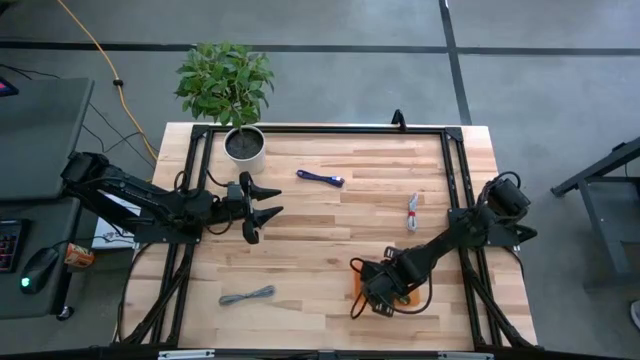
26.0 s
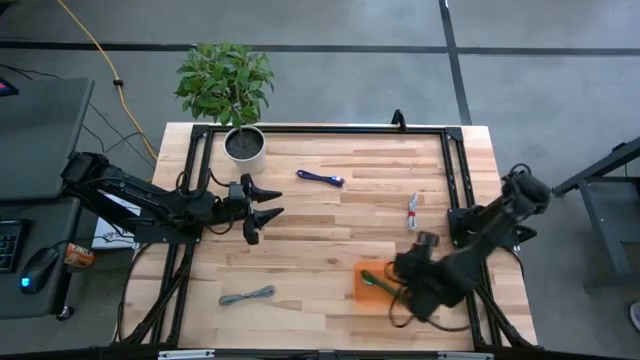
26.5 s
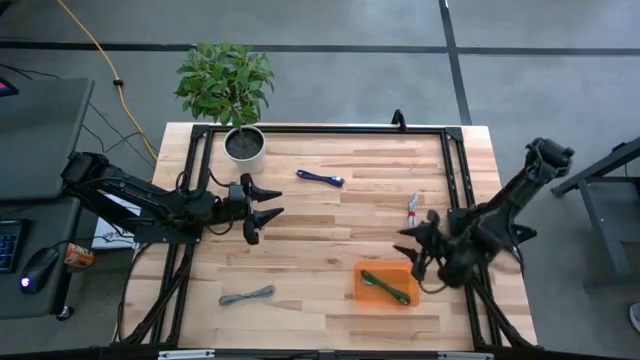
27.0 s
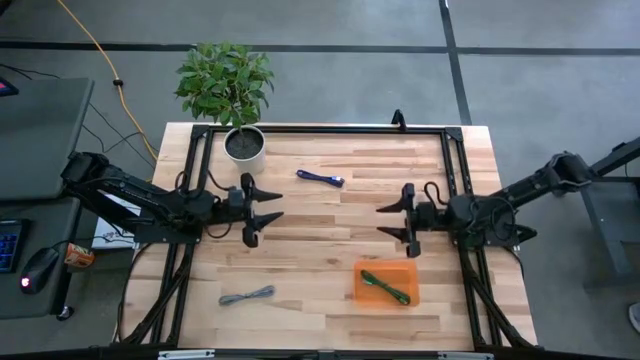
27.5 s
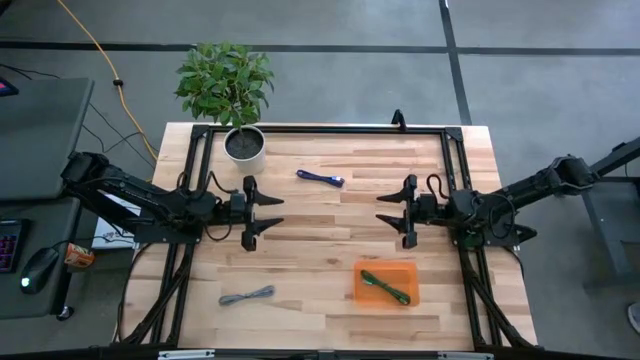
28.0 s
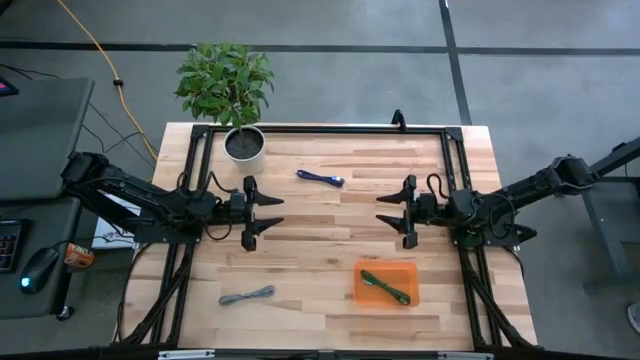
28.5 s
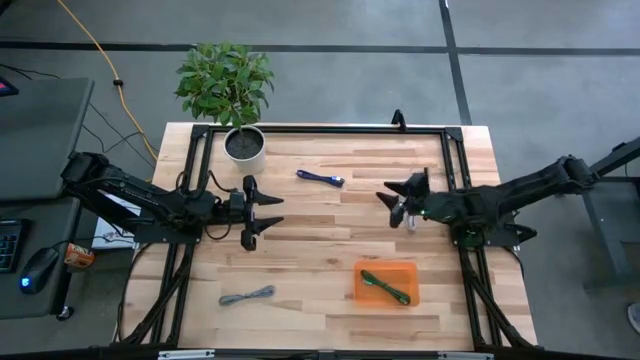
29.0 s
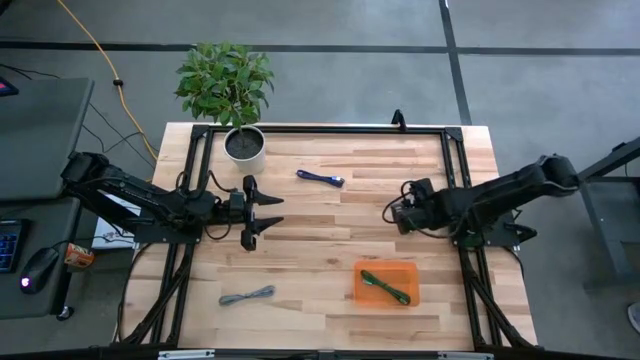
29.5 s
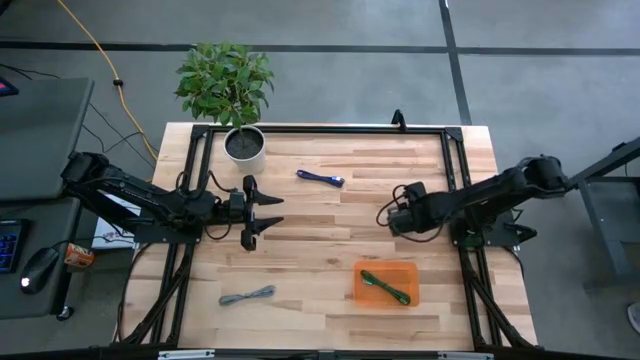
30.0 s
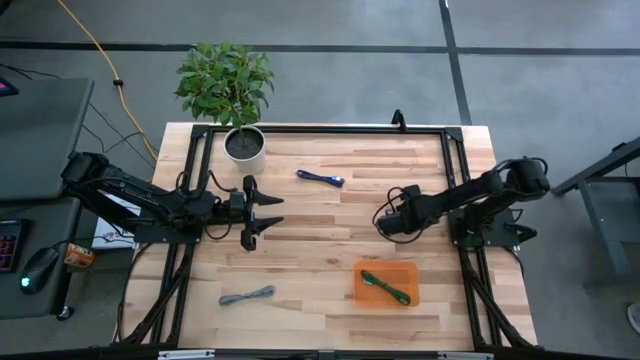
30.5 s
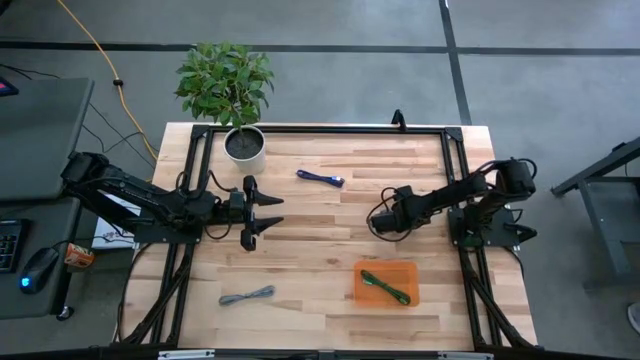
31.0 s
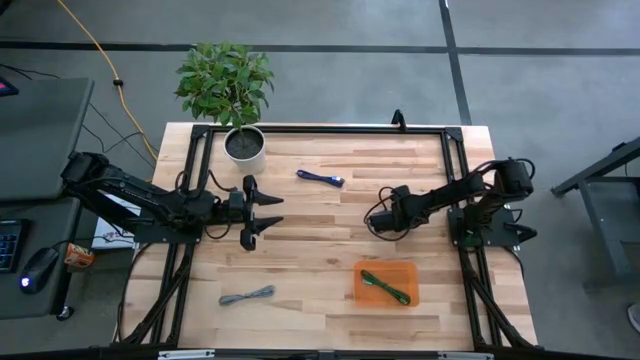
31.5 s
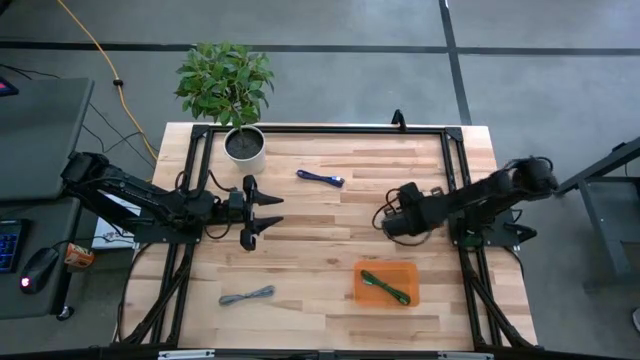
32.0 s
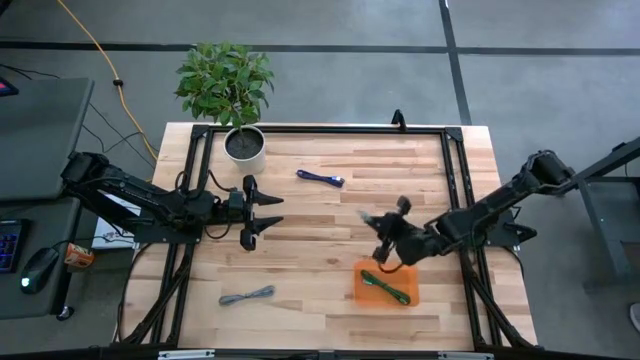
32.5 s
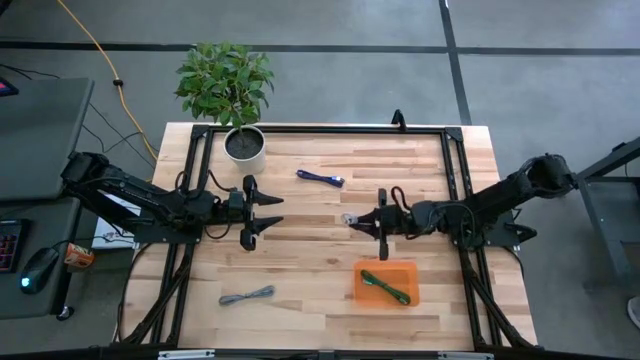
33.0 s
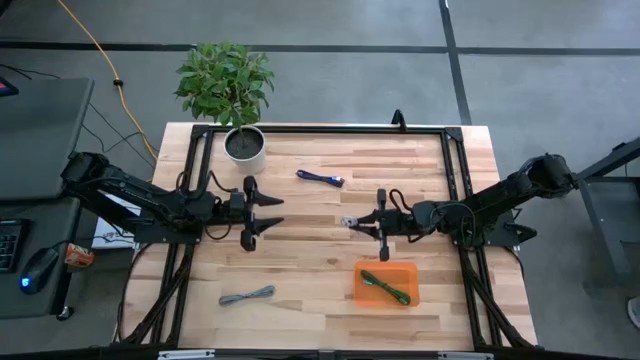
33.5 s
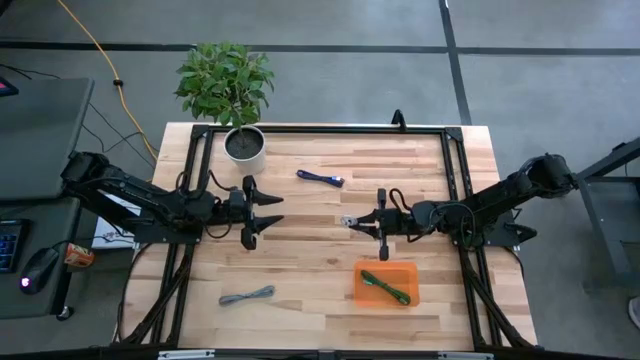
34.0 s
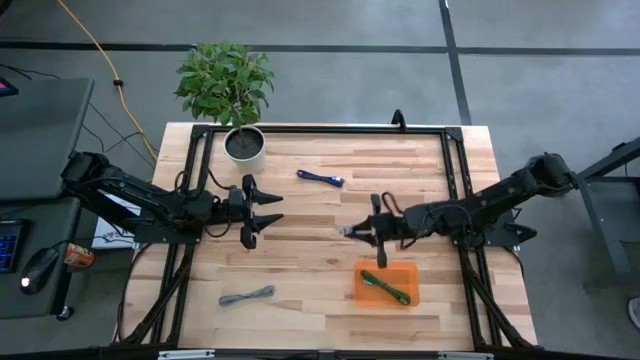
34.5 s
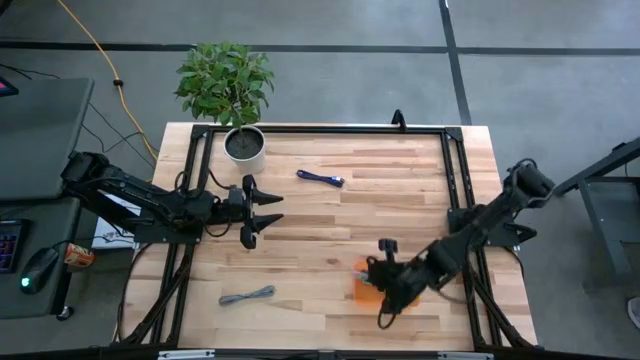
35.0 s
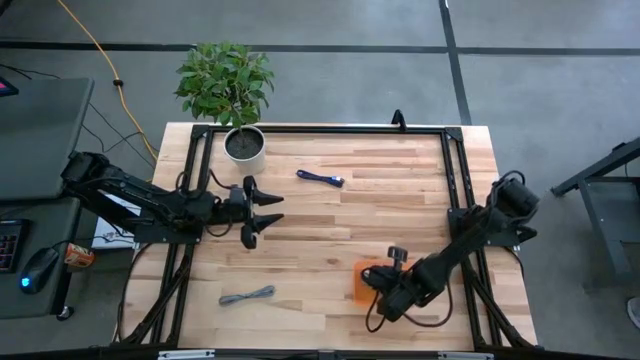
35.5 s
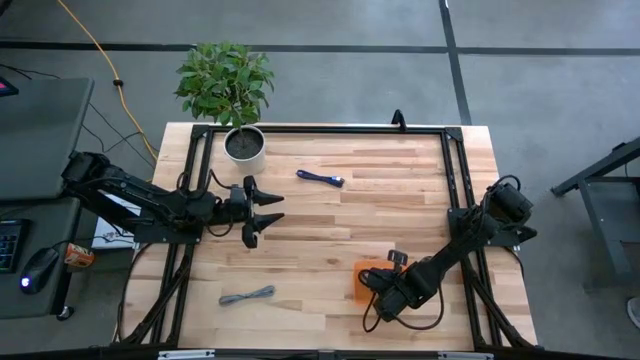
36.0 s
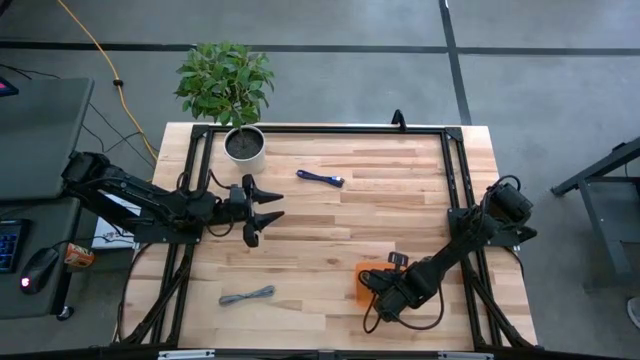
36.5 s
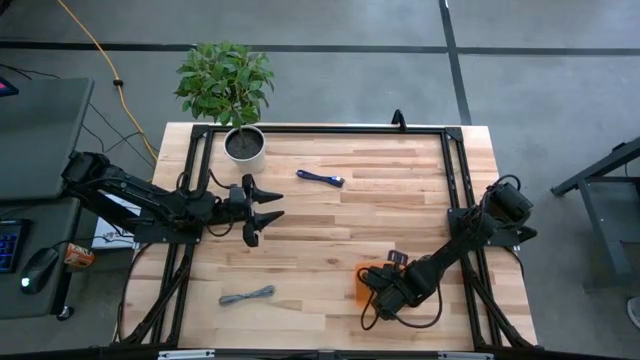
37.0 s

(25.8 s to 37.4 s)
Task: Pick and place USB-C Cables
Put the white charger cable into the orange bin

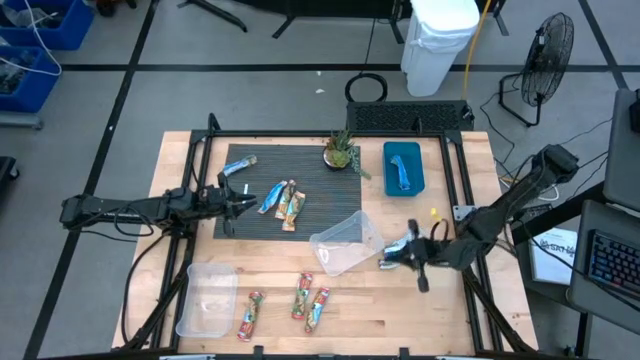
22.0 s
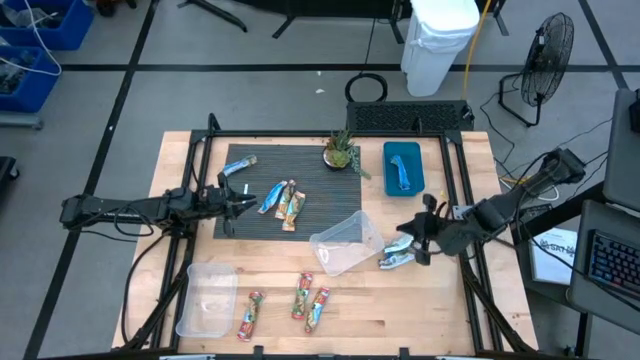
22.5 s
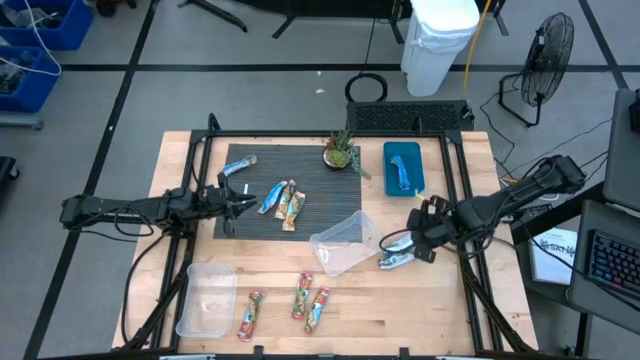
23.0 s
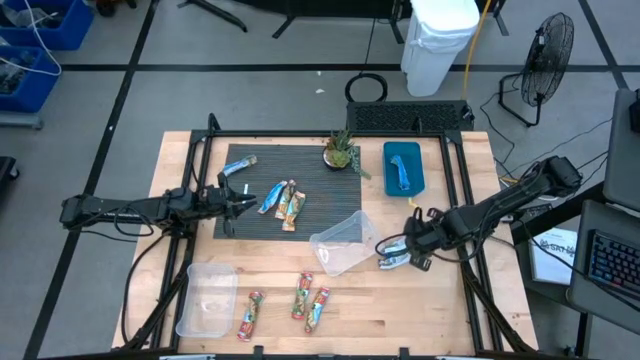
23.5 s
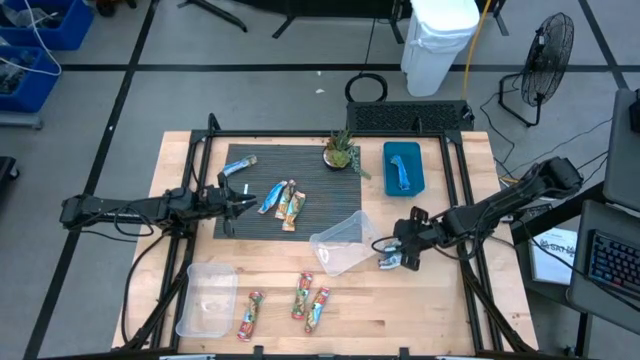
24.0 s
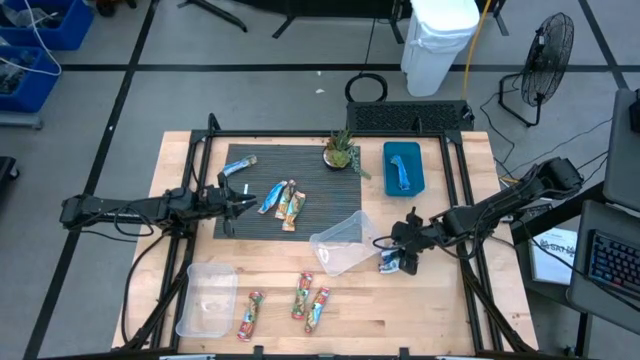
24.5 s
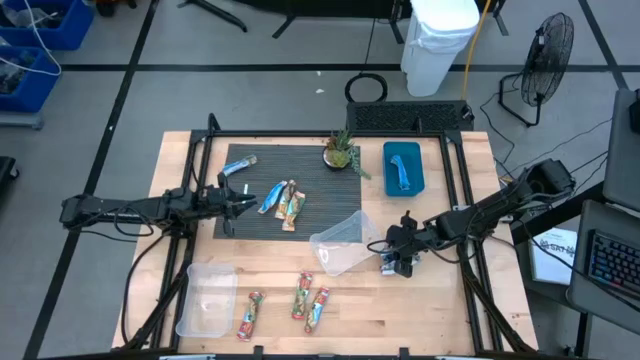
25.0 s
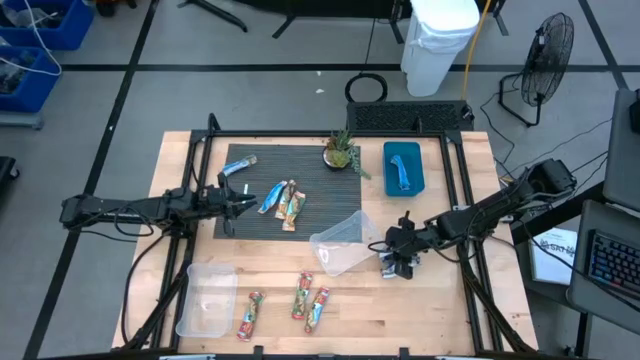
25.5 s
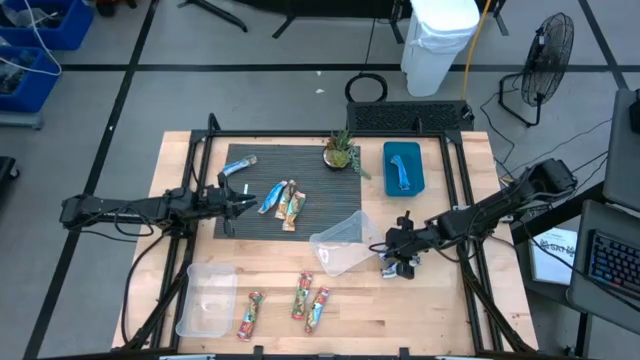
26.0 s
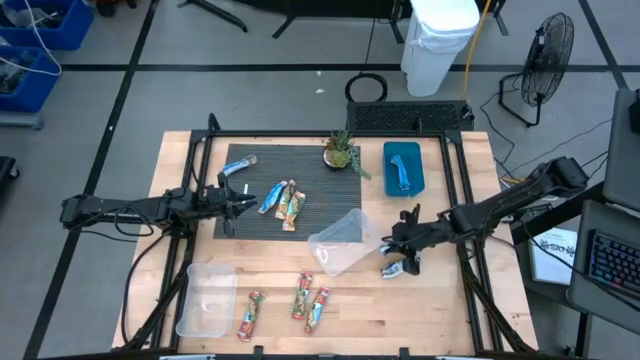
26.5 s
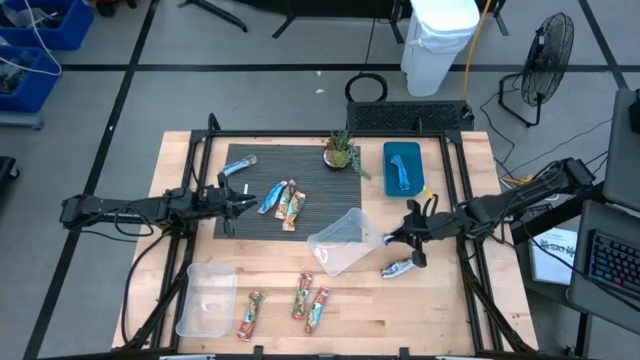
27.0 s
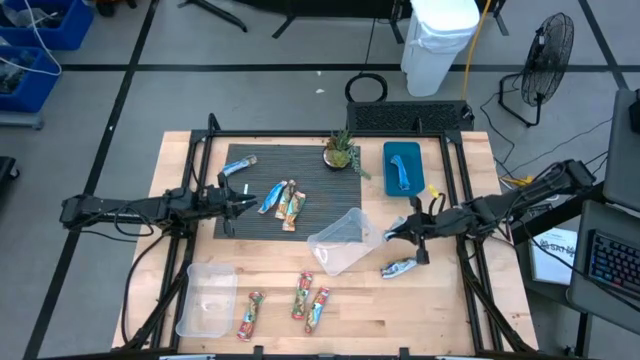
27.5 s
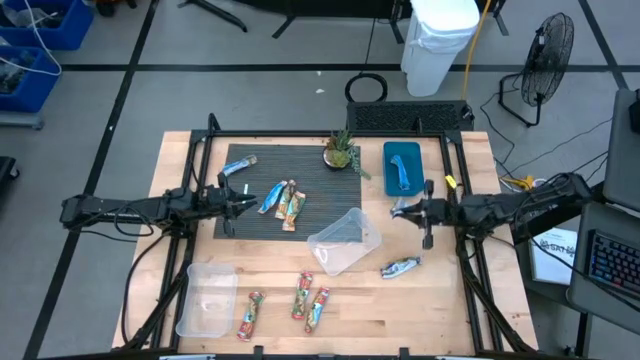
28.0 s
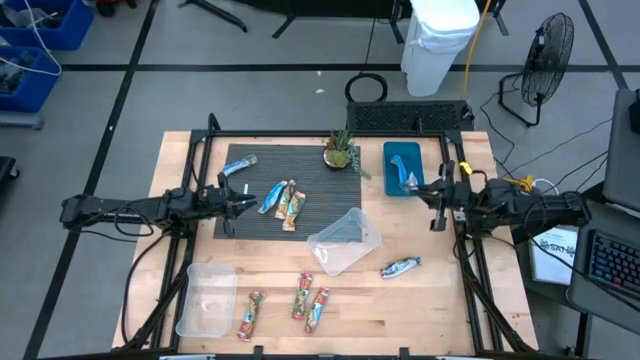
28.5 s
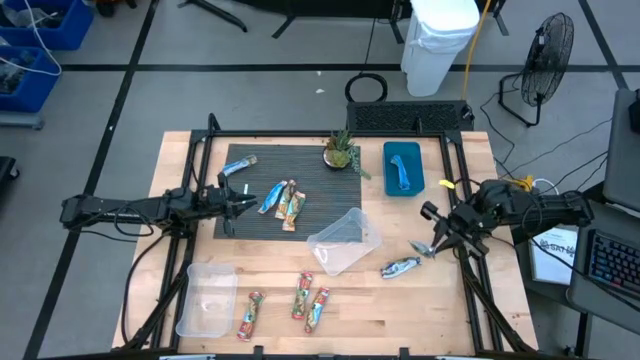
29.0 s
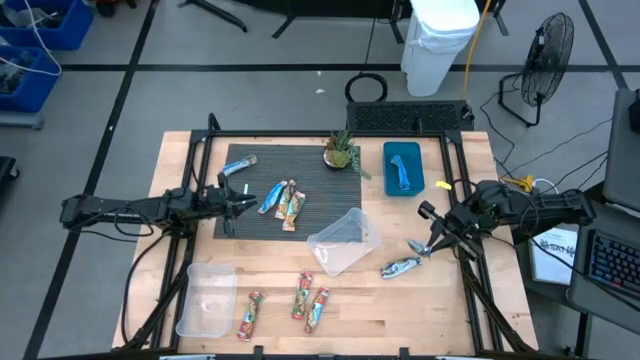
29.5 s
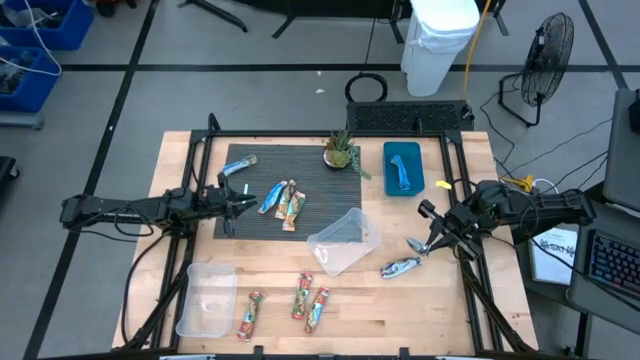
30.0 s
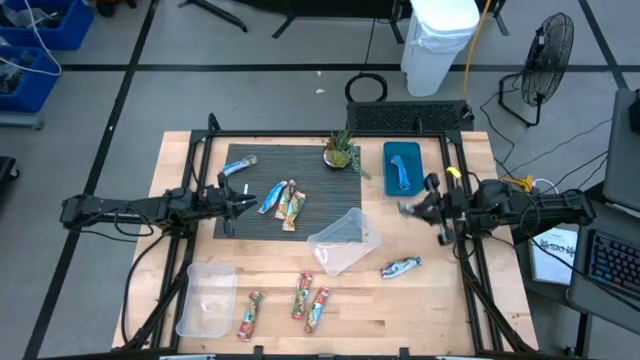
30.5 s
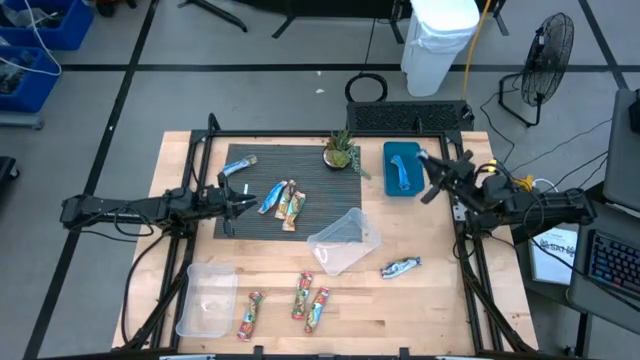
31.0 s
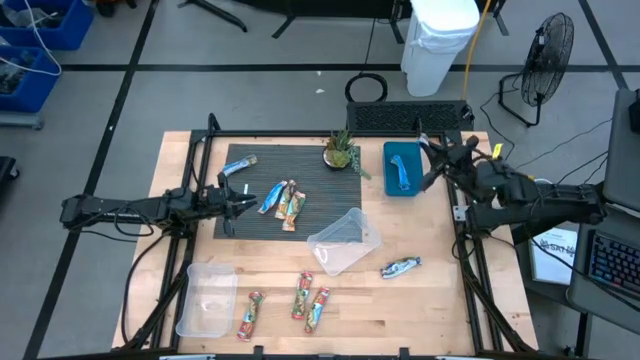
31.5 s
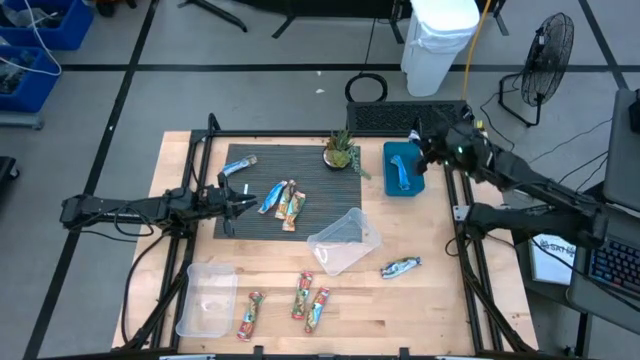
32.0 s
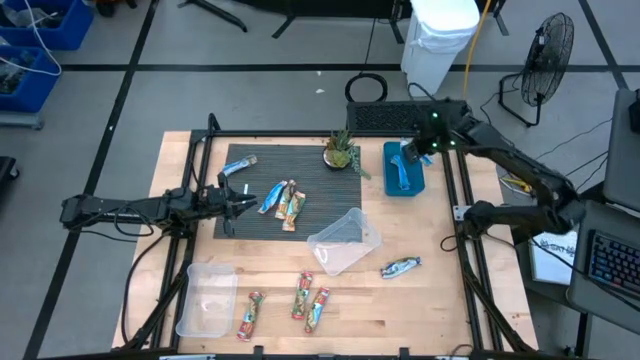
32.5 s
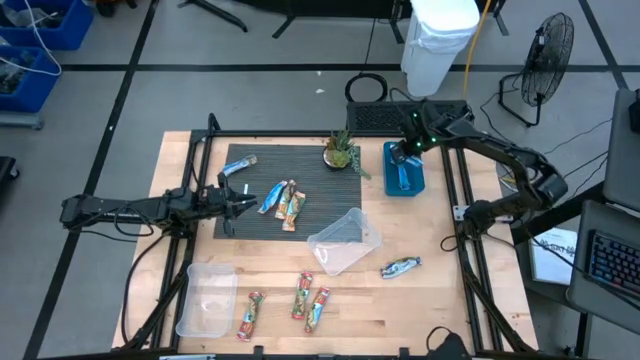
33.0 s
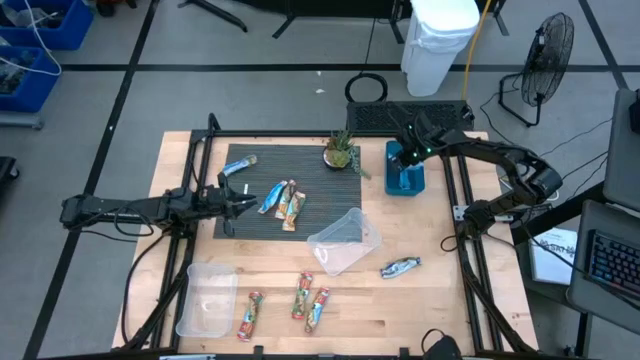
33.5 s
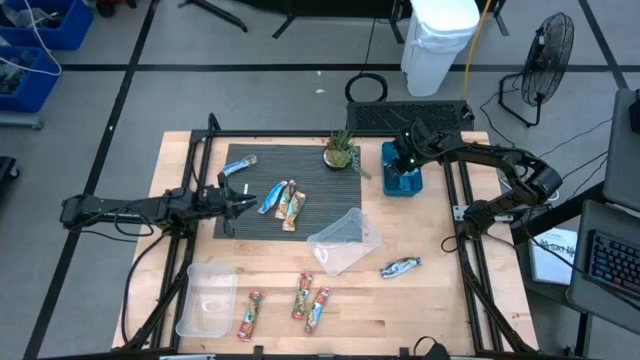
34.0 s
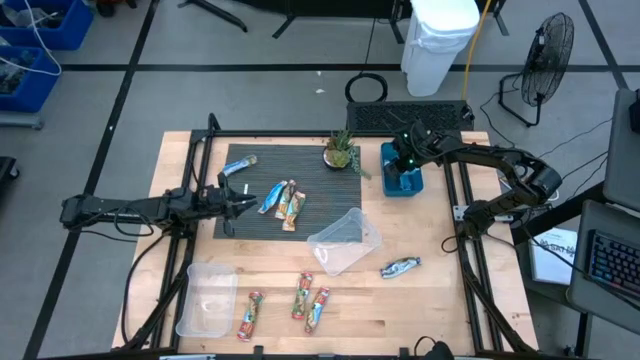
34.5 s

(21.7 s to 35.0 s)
Task: Pick and place Granola Bars by type
Put the top blue granola bar into the blue bin
